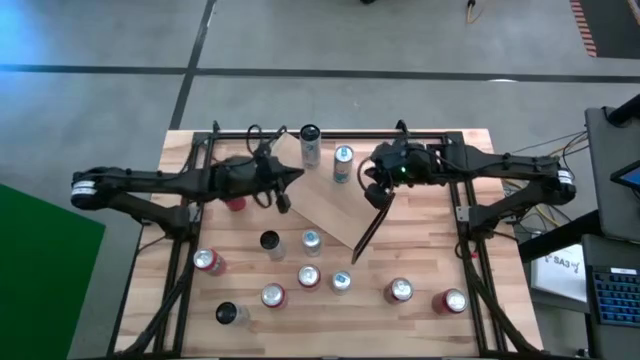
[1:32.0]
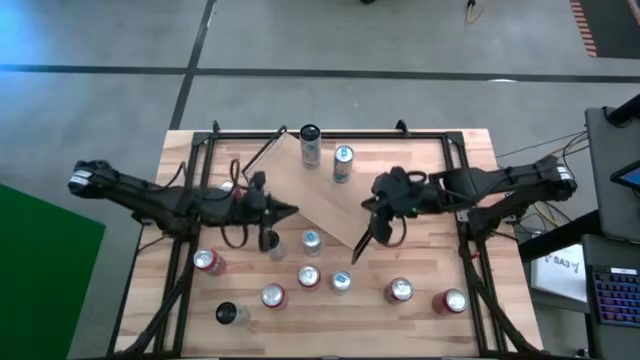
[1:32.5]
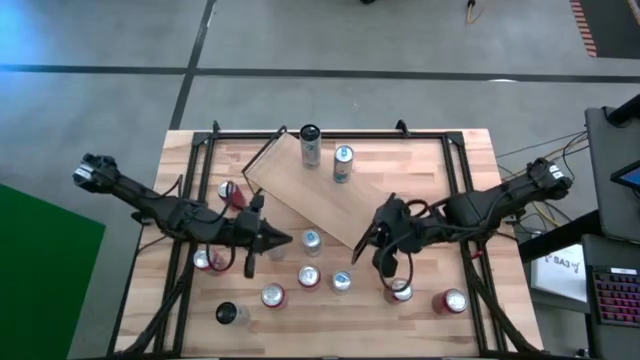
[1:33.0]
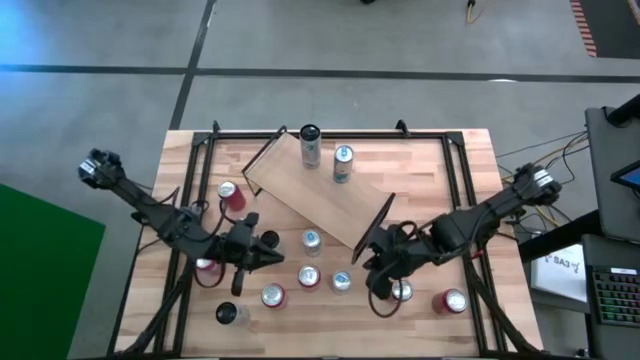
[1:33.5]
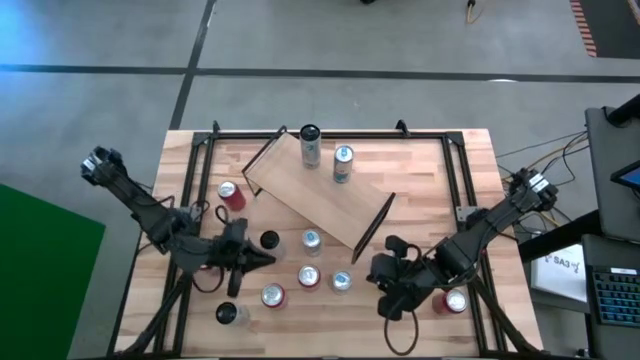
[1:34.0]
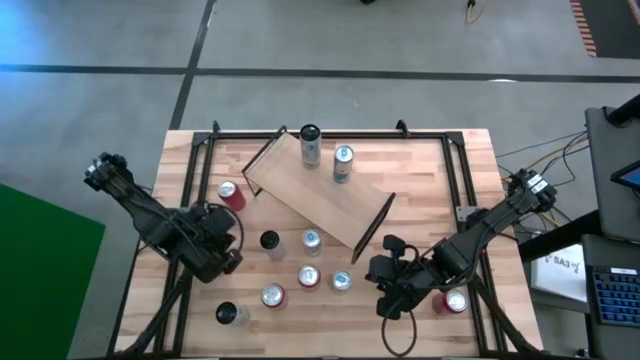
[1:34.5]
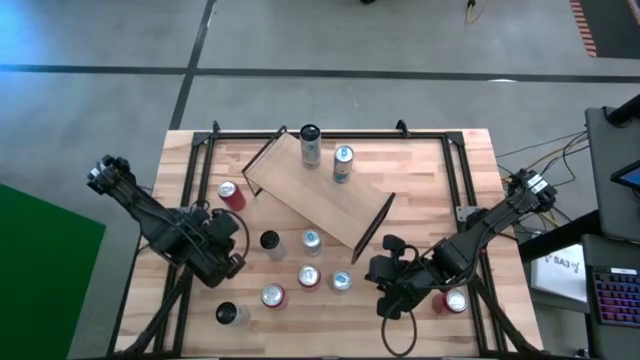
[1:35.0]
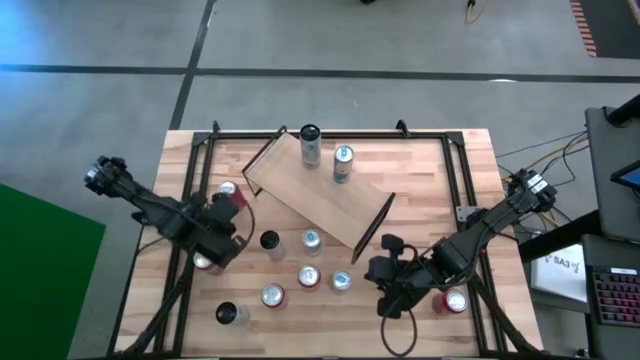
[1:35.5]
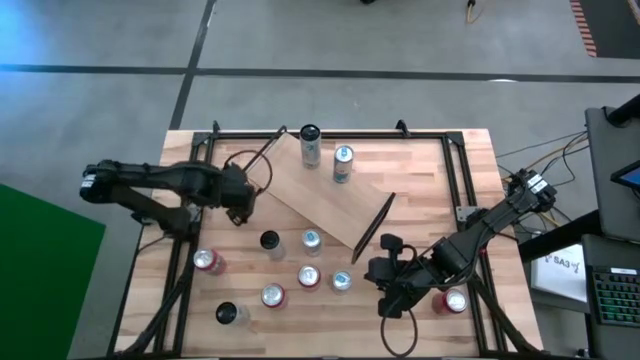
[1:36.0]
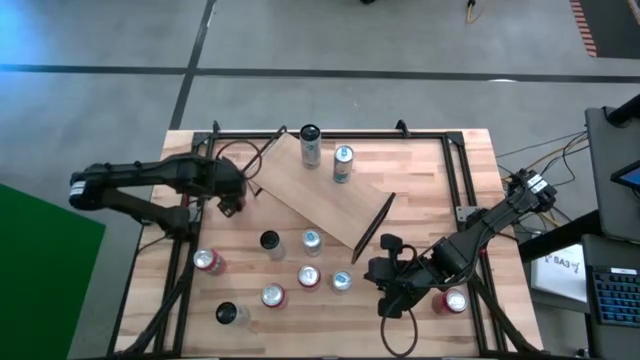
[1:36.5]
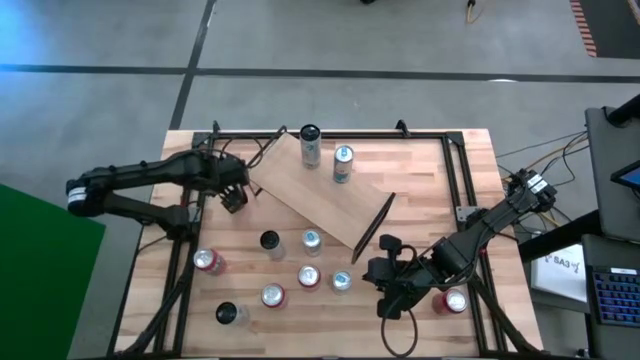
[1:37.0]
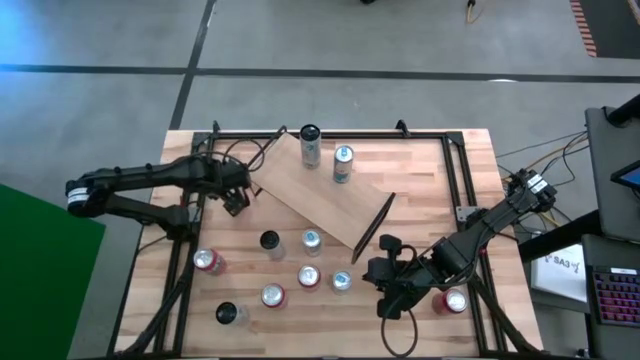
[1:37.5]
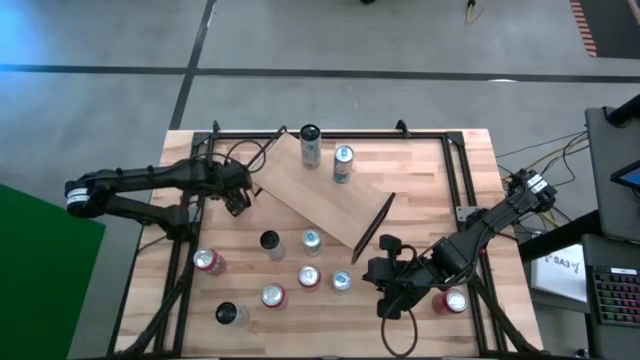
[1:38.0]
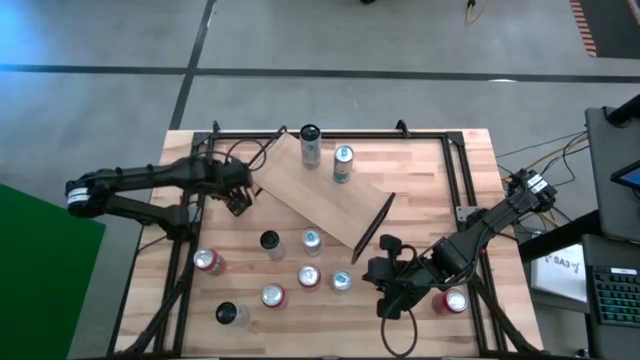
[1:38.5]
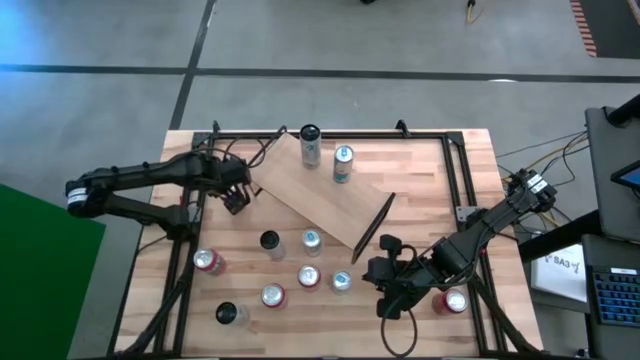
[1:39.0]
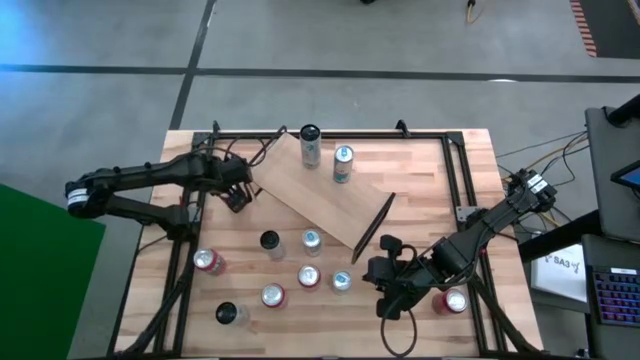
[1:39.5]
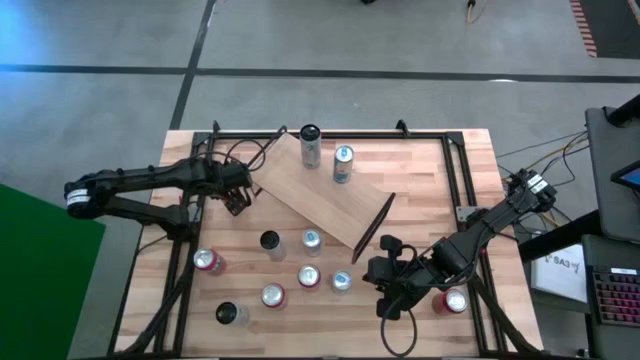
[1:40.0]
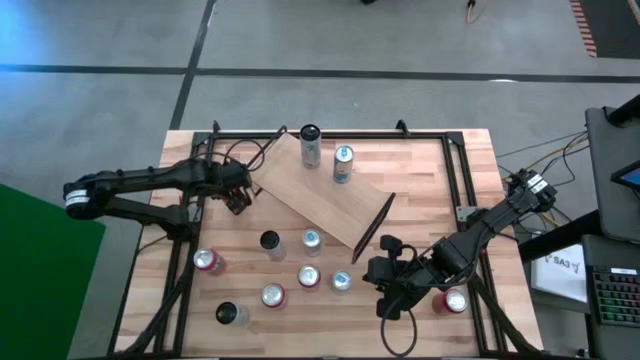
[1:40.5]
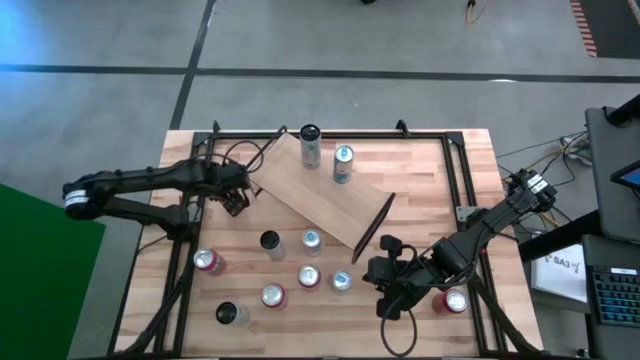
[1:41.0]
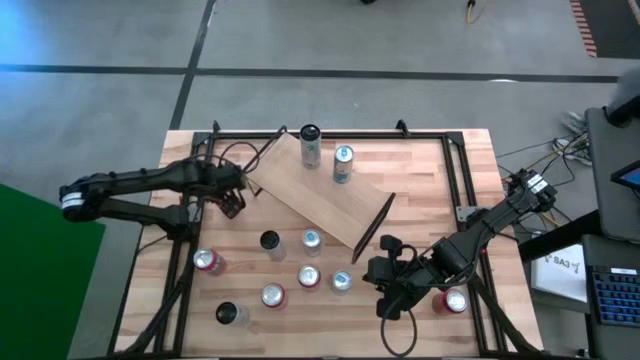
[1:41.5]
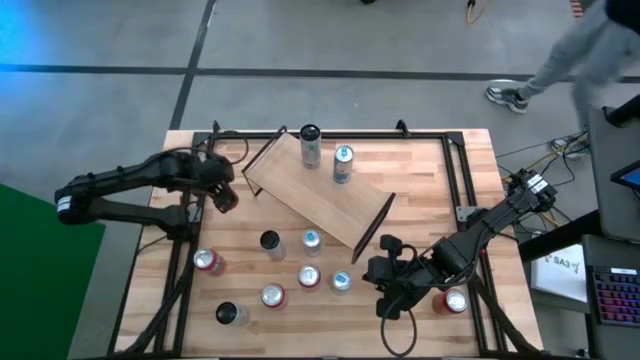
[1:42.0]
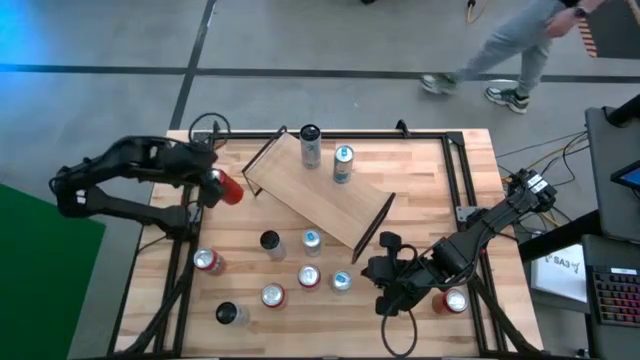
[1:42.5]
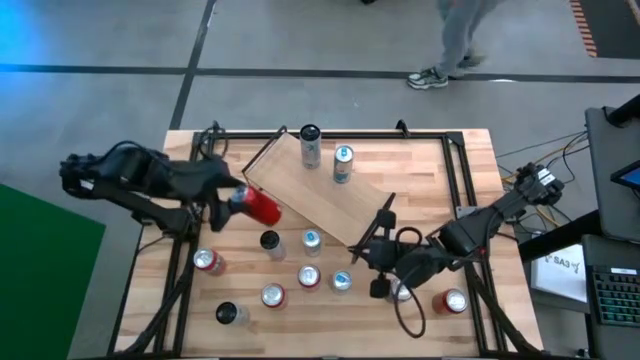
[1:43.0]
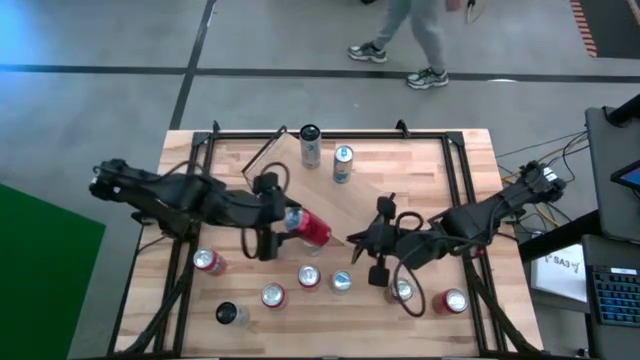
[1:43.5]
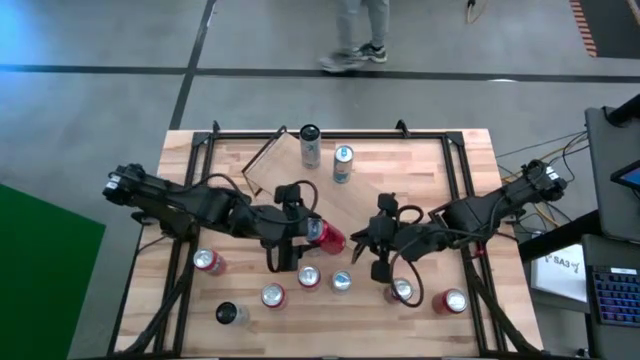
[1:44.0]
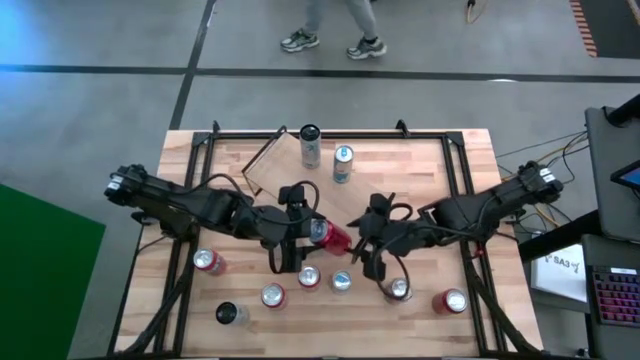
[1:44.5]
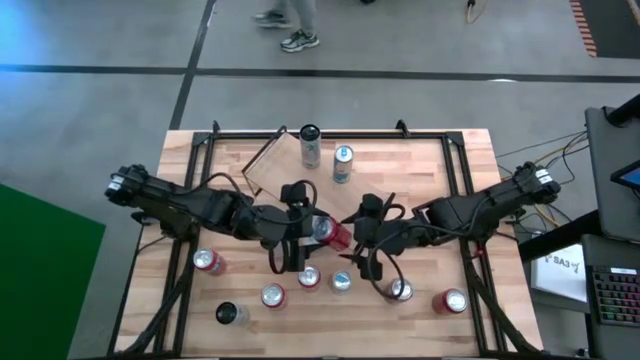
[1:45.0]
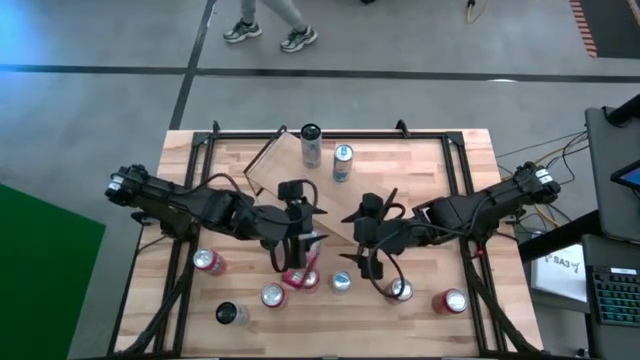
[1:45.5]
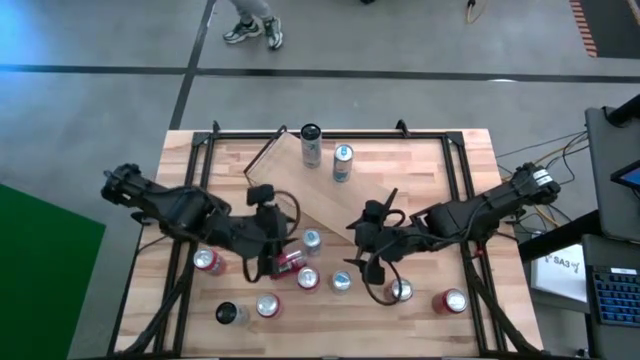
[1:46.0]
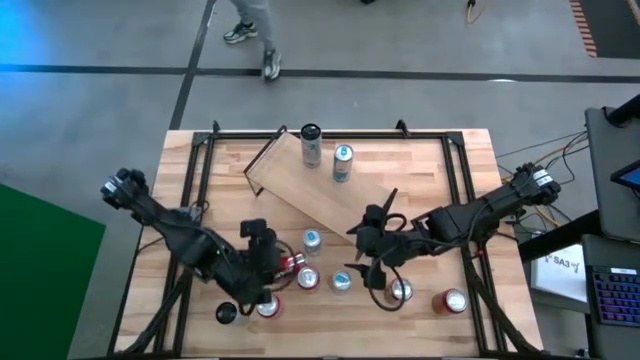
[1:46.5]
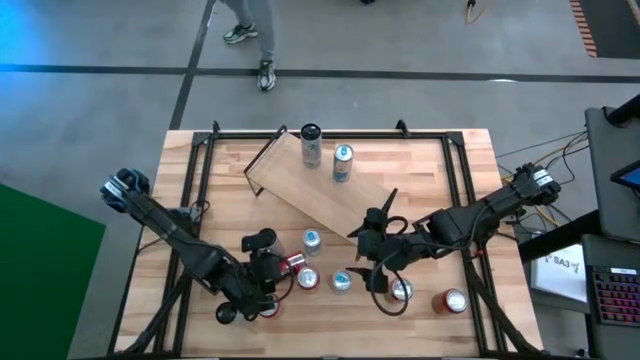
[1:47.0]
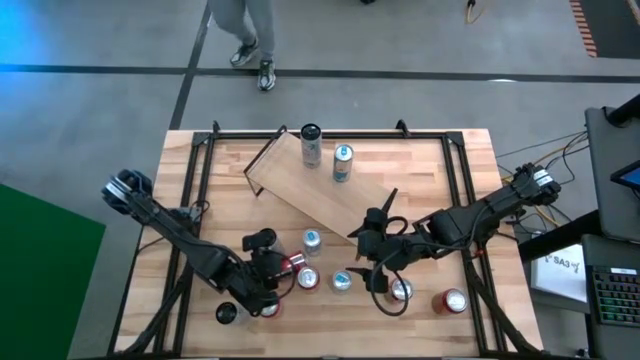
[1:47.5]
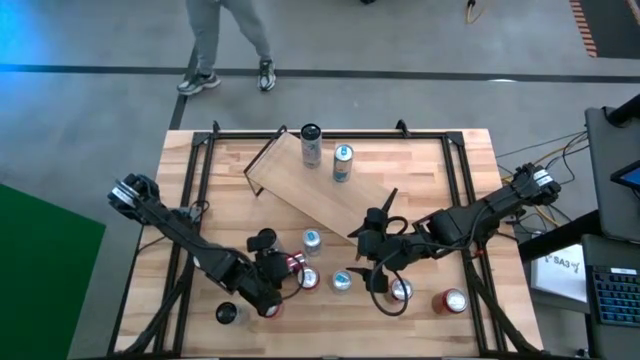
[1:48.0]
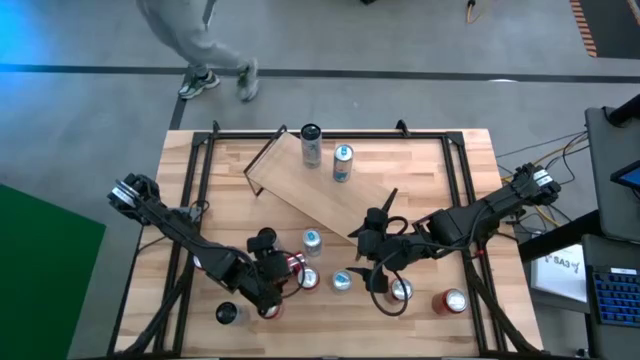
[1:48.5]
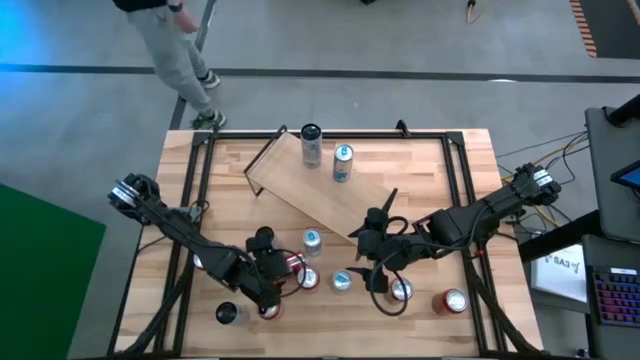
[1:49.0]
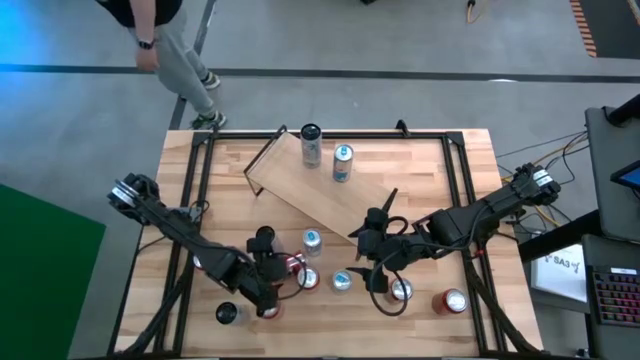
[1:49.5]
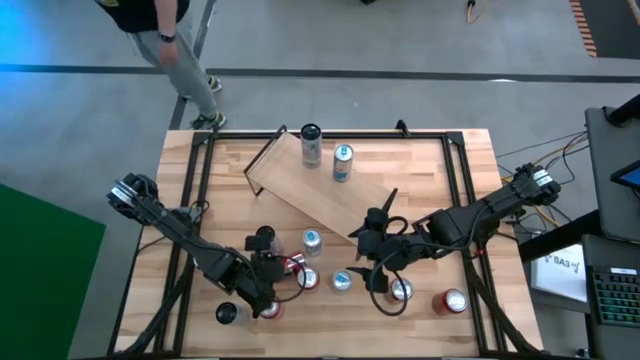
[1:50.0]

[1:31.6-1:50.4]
Task: Place canned beverage on shelf
Put the red/black soda can on the shelf

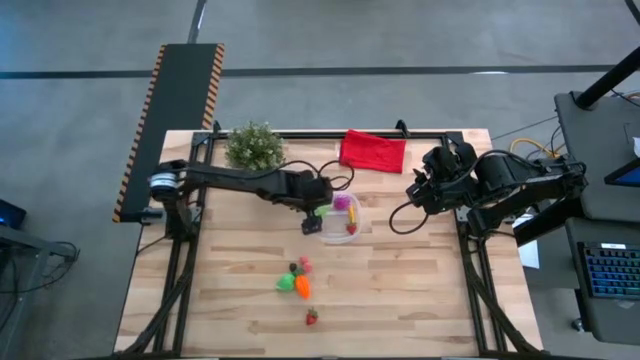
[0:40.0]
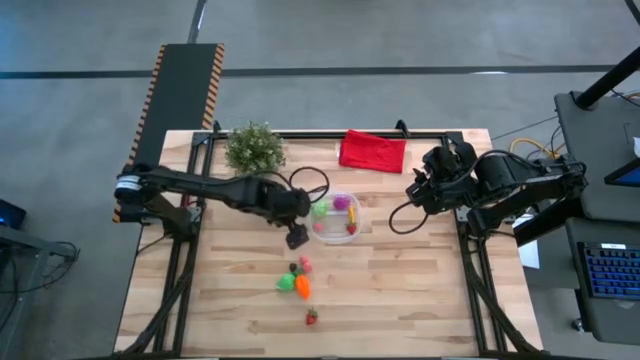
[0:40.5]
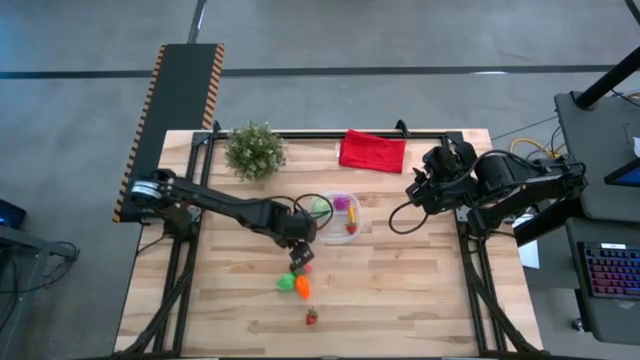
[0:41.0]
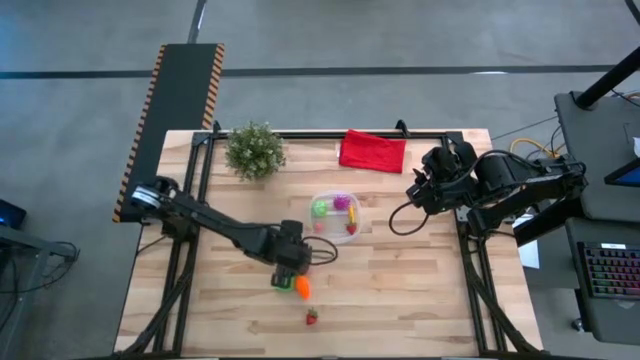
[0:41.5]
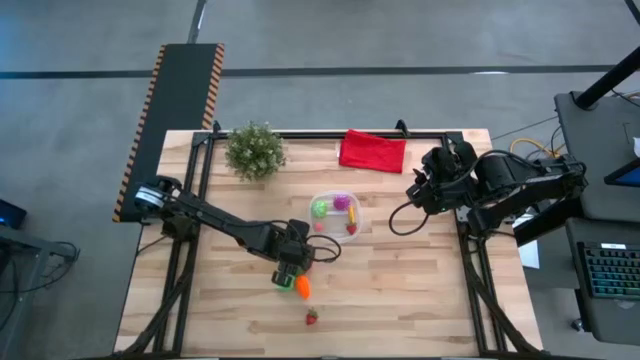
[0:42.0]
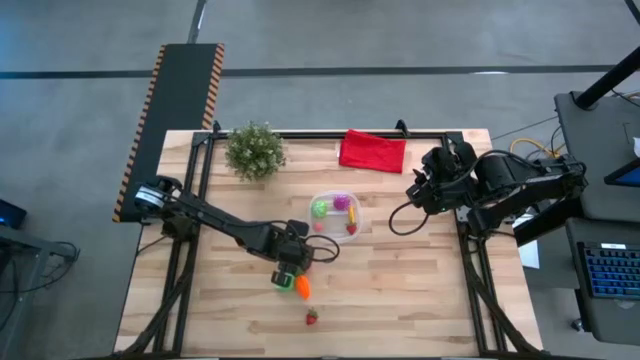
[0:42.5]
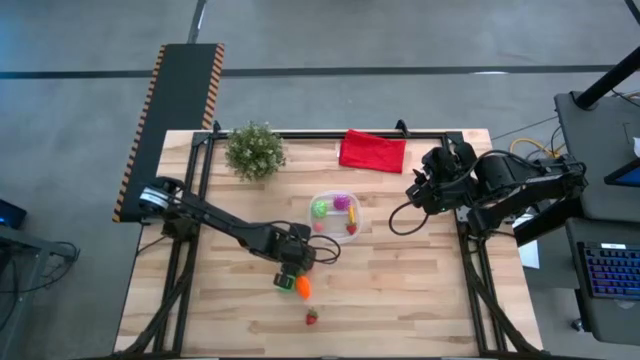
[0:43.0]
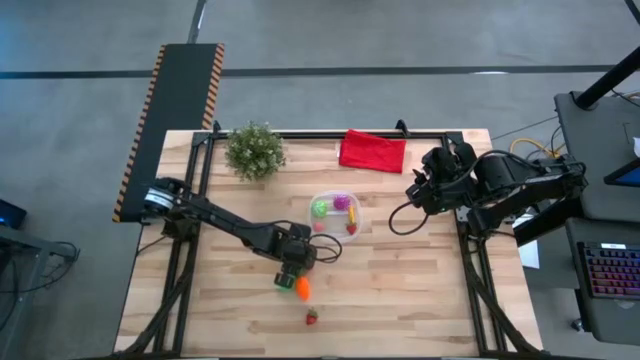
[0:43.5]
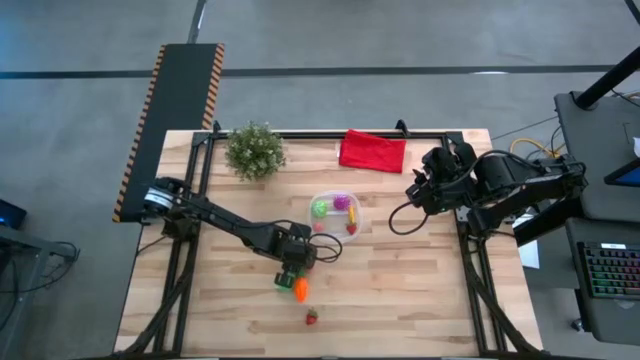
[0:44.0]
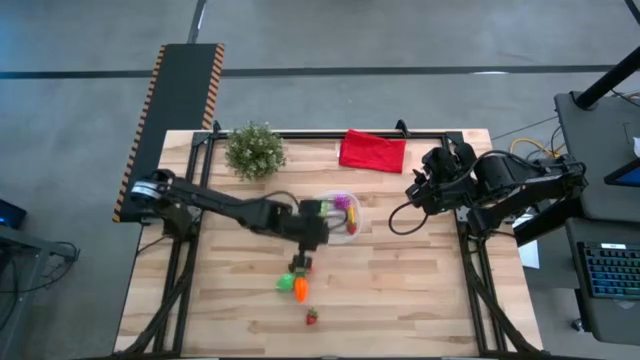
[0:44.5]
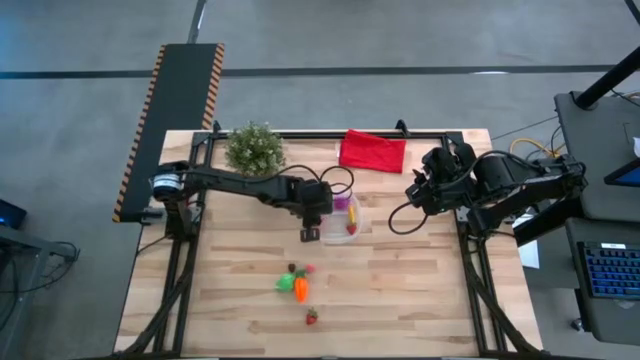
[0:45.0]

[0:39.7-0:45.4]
Task: Pick and placing Produce into tupperware
Put the top pink peach into the transparent container
